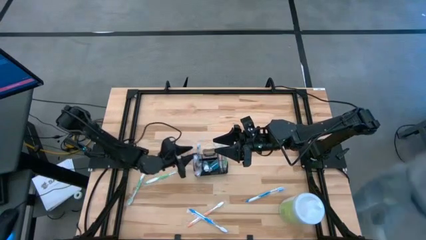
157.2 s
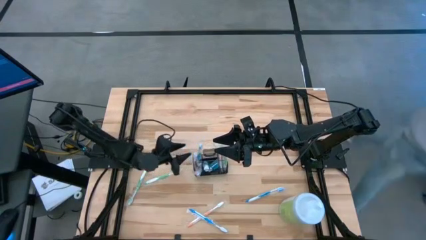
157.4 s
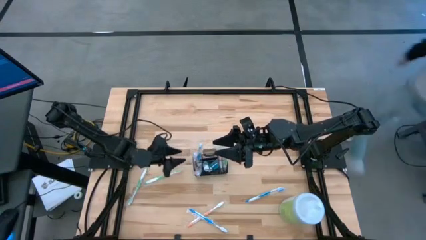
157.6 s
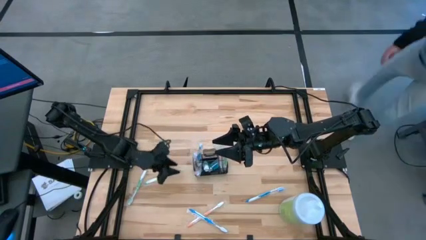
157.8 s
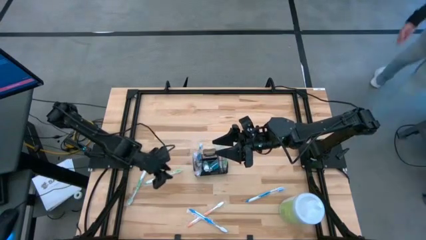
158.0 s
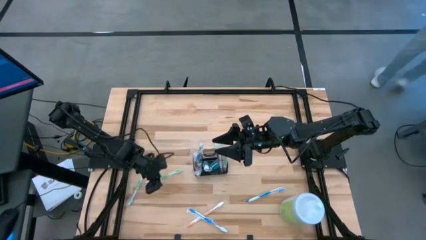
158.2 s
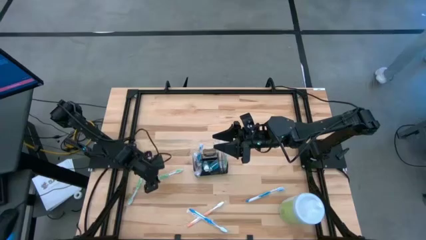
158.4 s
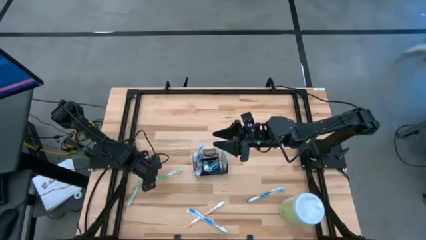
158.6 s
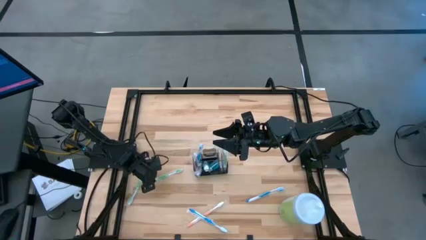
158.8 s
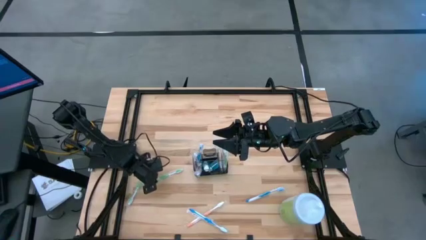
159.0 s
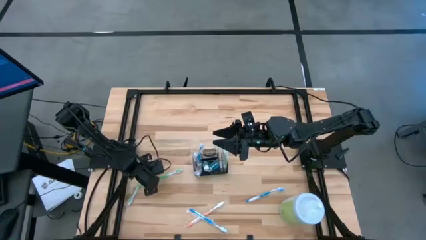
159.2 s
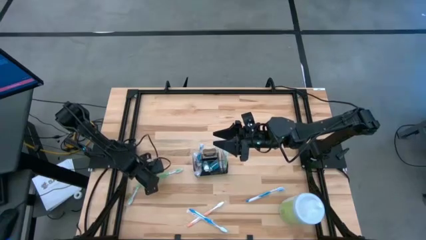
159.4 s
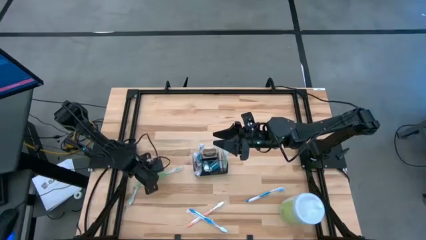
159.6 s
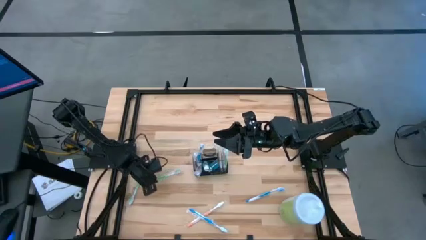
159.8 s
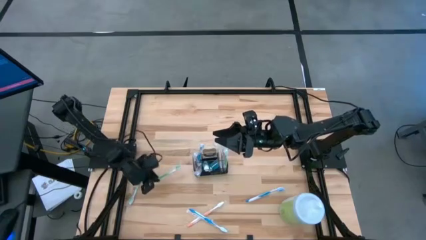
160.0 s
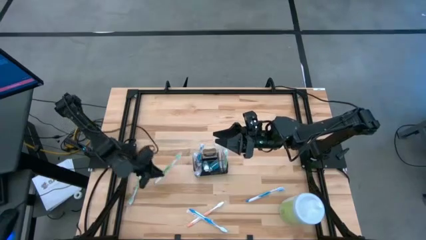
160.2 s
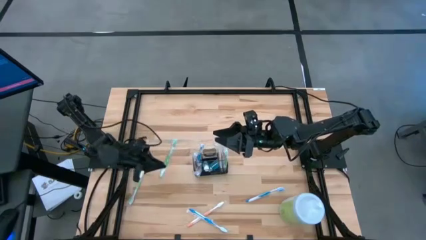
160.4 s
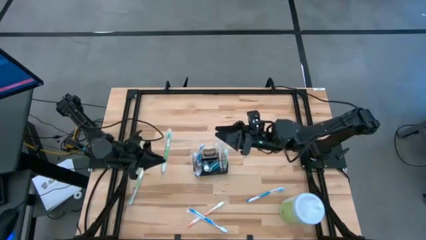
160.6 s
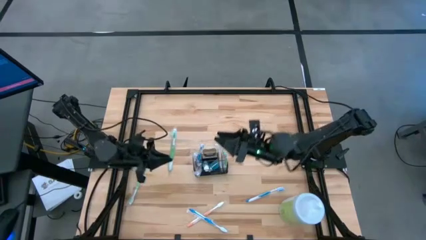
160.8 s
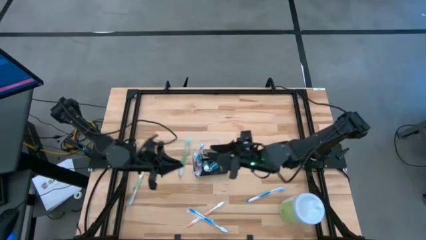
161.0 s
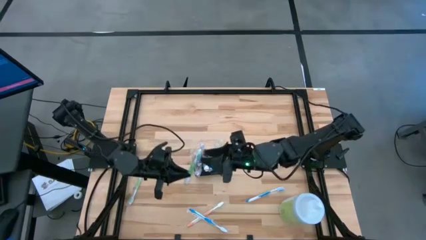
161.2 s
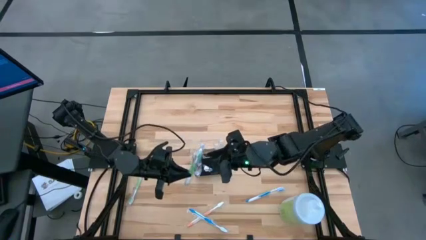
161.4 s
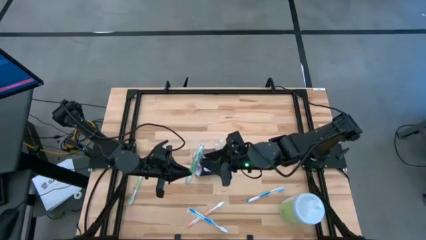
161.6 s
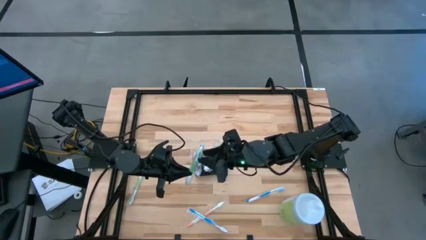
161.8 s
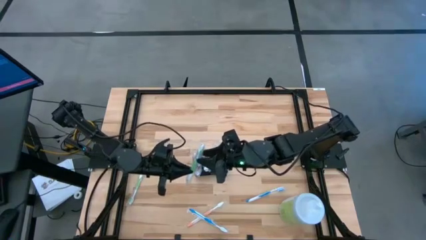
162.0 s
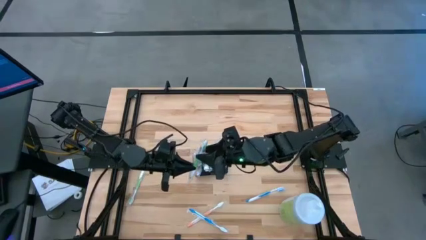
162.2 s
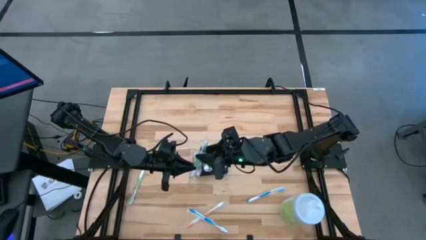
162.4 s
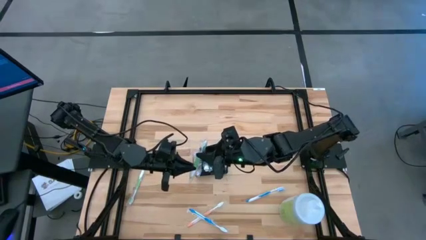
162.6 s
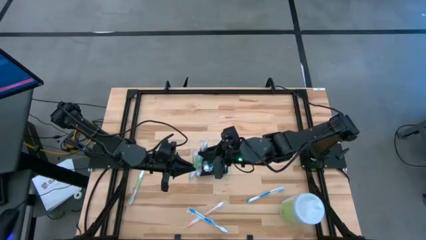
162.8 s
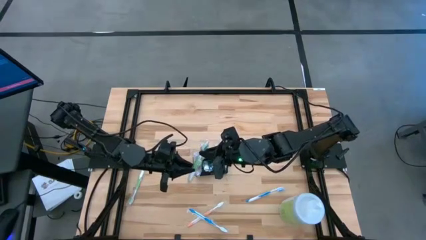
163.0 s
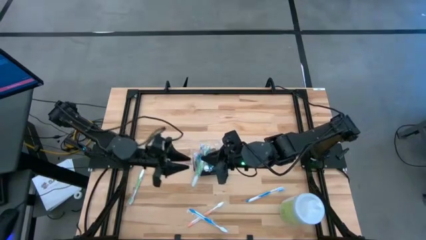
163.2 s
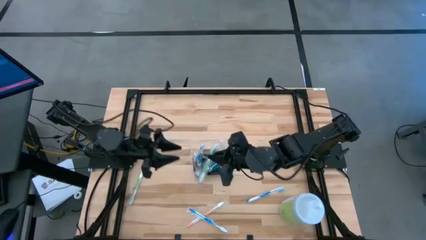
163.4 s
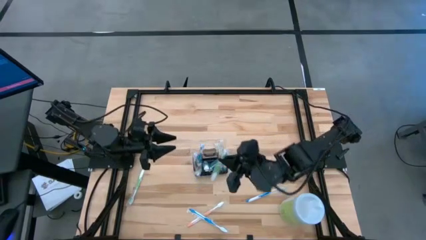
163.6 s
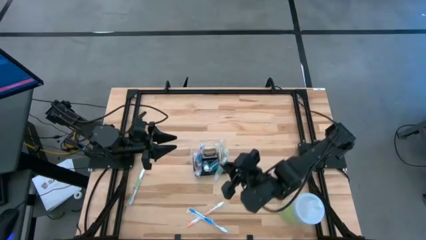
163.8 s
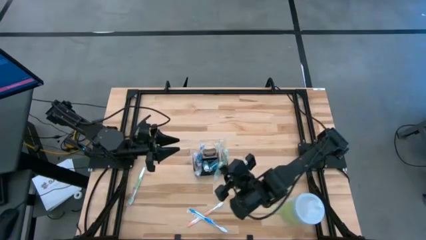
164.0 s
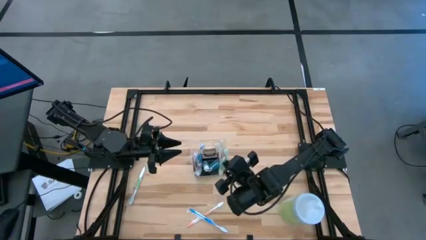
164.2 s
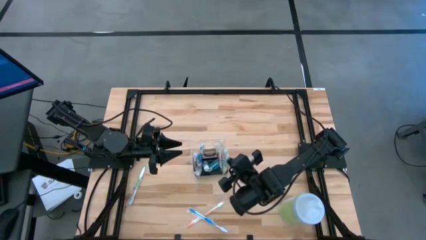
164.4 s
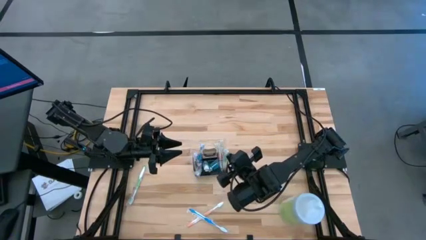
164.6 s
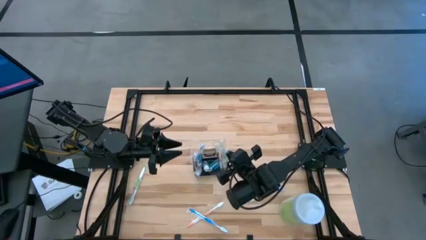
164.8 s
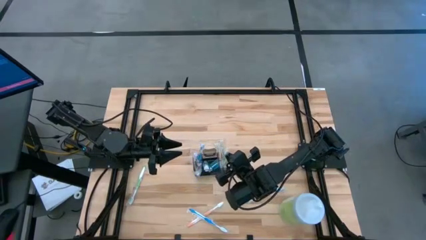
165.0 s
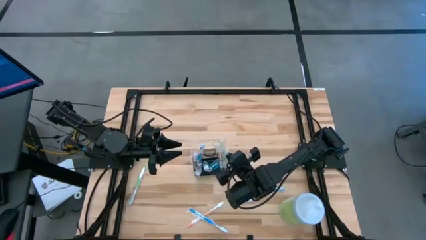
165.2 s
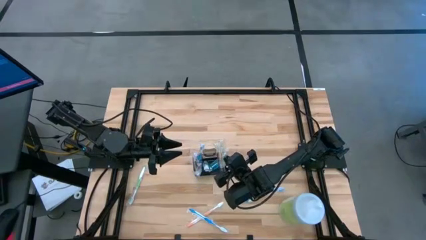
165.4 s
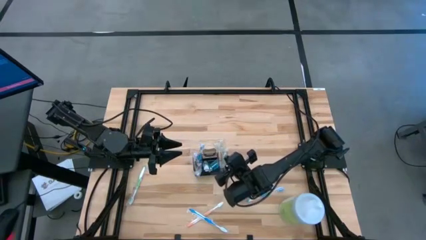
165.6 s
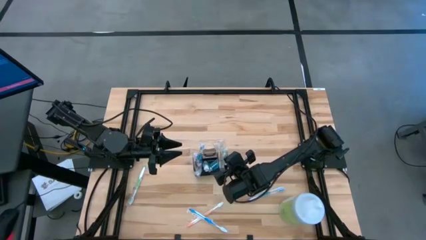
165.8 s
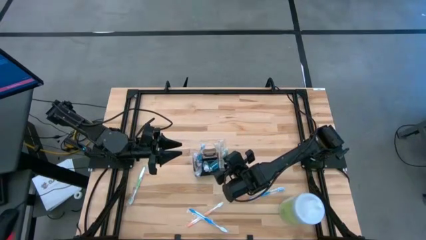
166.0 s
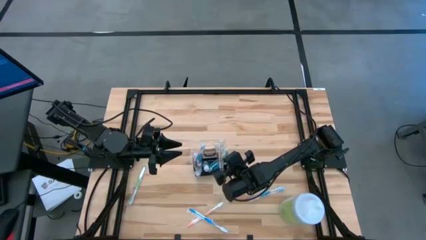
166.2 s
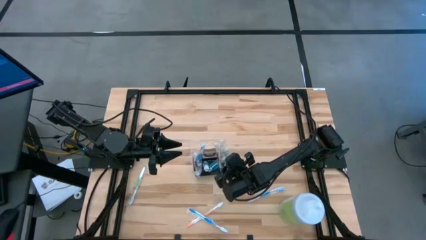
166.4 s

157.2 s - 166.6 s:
Task: Pick & Place toothbrushing station
Put the right green toothbrush into the bottom right section of the mesh organizer

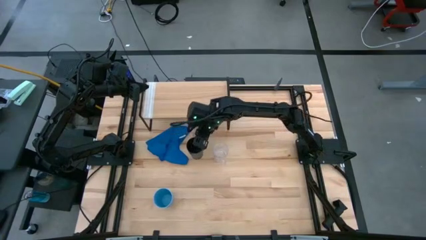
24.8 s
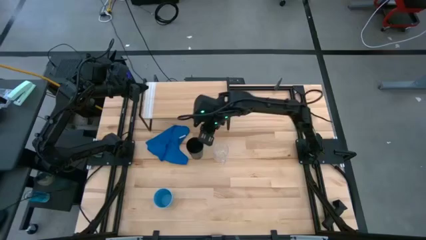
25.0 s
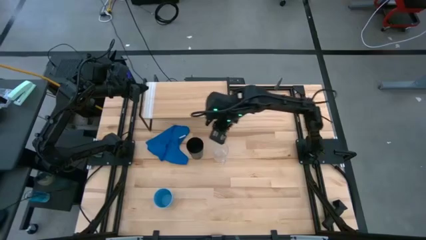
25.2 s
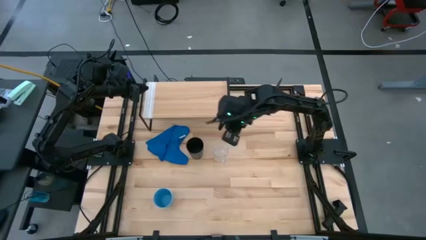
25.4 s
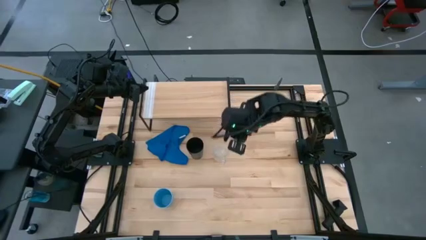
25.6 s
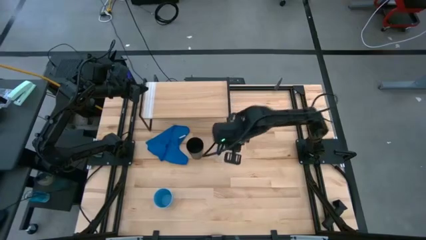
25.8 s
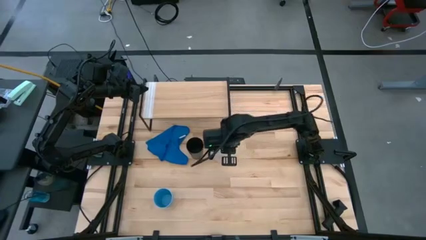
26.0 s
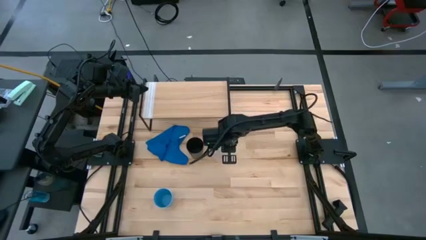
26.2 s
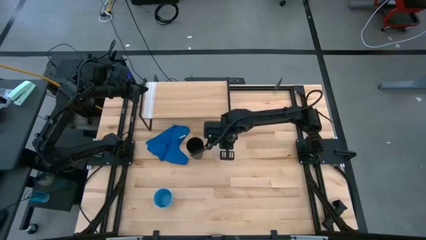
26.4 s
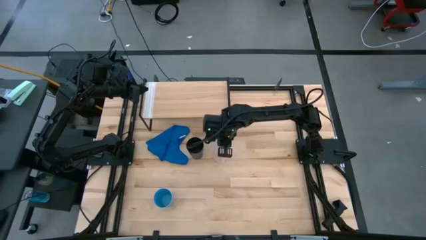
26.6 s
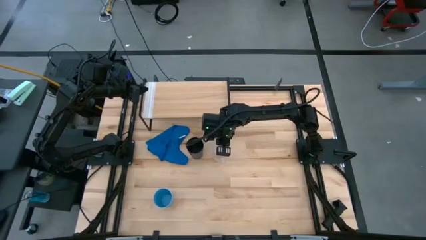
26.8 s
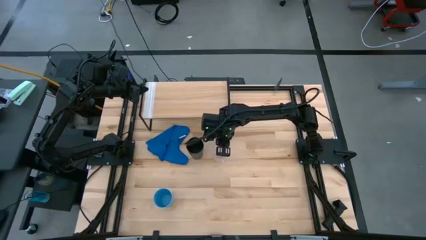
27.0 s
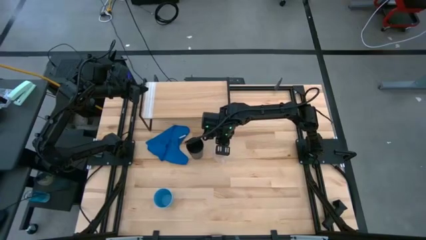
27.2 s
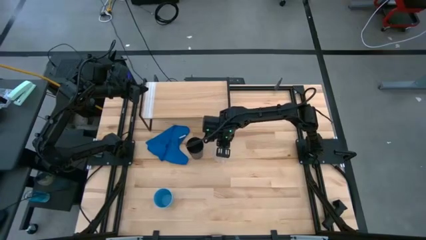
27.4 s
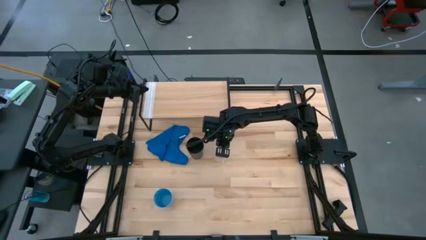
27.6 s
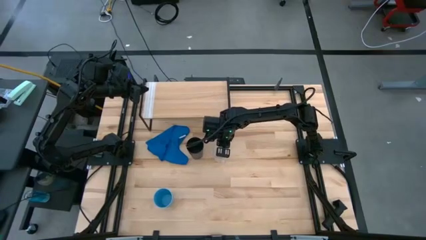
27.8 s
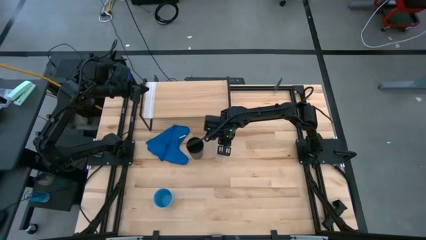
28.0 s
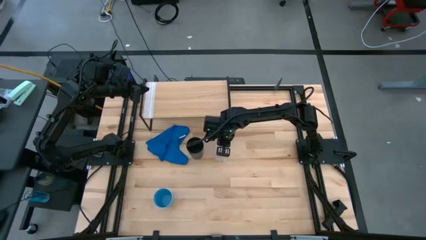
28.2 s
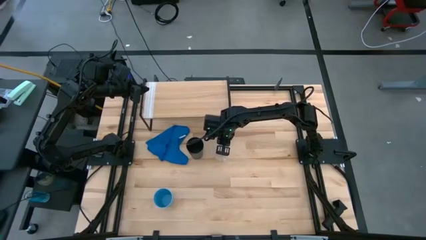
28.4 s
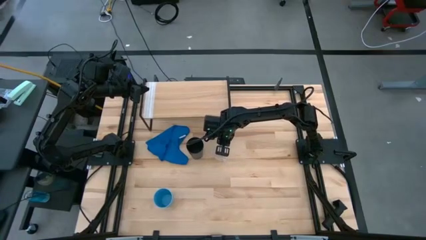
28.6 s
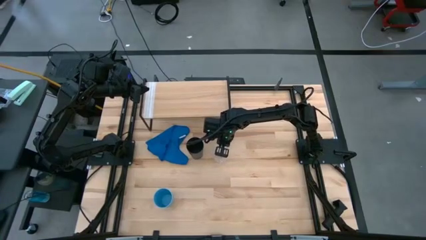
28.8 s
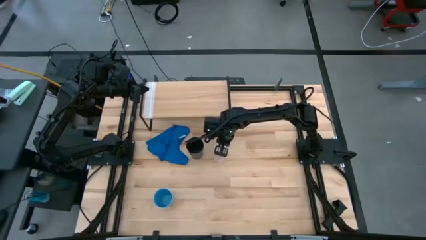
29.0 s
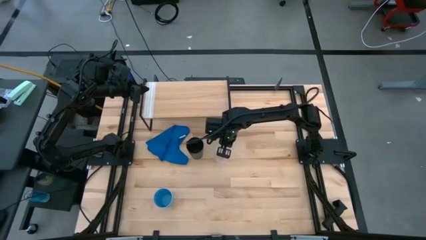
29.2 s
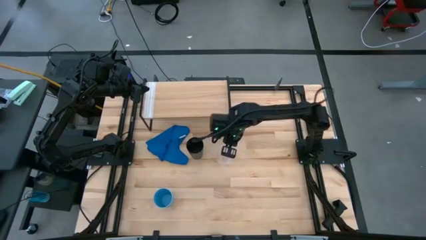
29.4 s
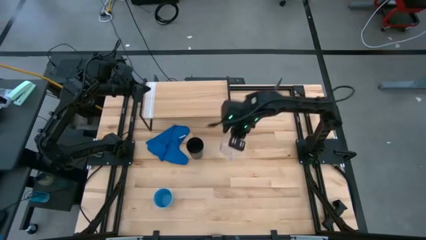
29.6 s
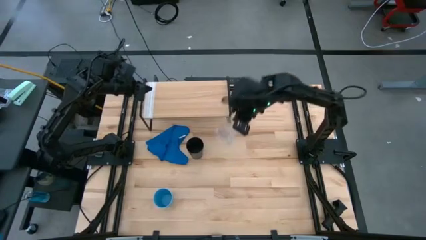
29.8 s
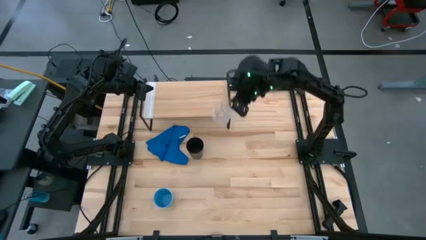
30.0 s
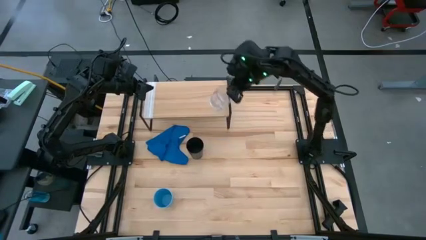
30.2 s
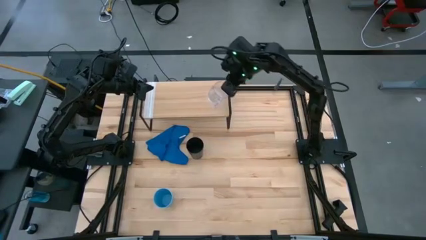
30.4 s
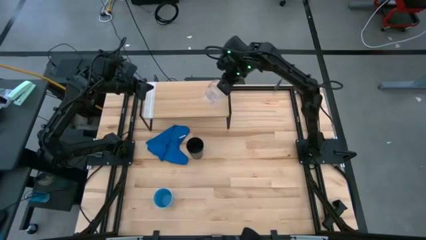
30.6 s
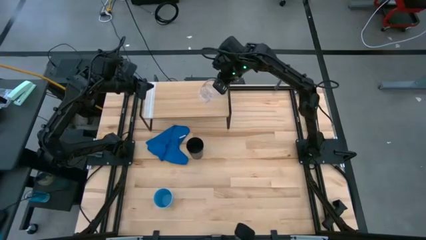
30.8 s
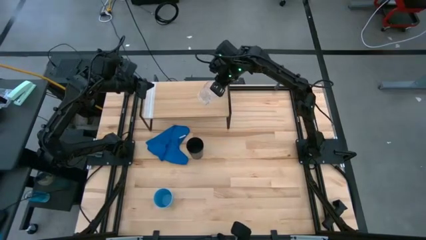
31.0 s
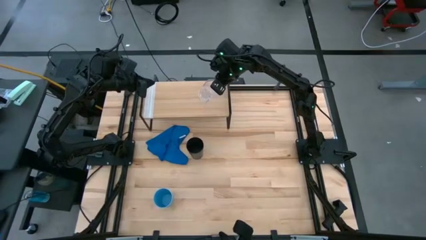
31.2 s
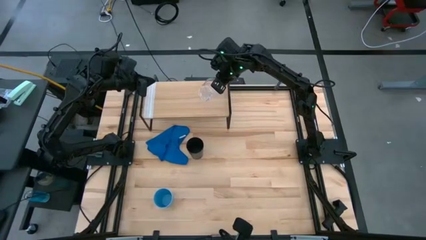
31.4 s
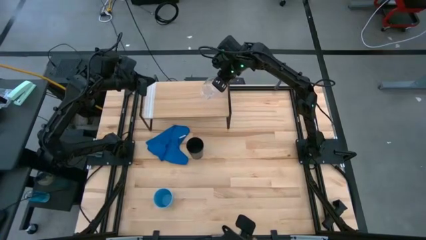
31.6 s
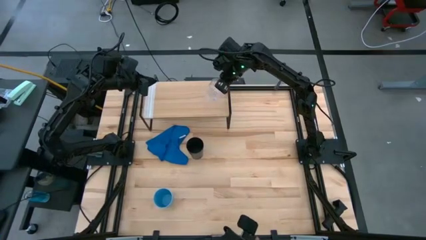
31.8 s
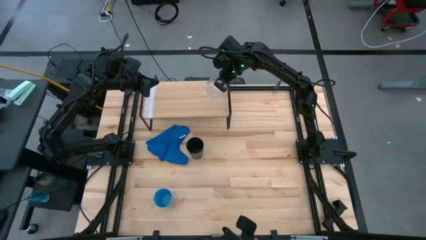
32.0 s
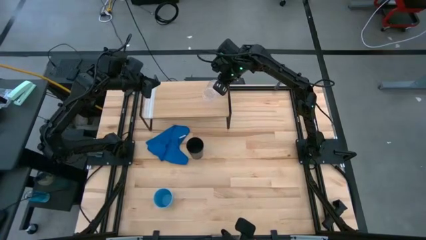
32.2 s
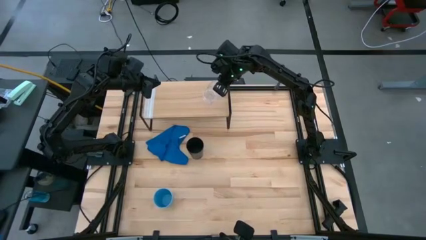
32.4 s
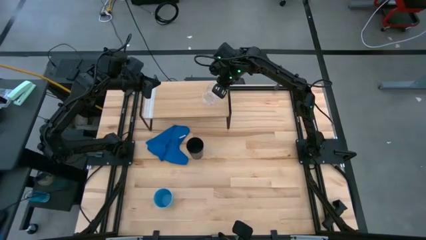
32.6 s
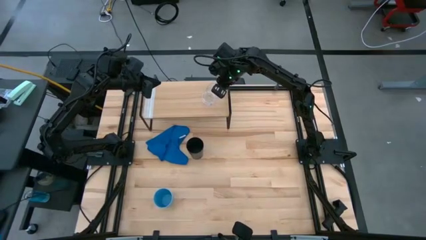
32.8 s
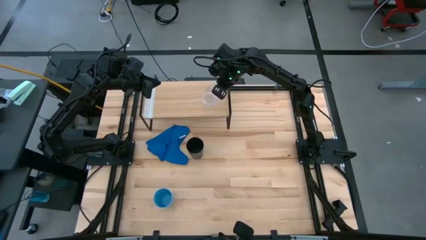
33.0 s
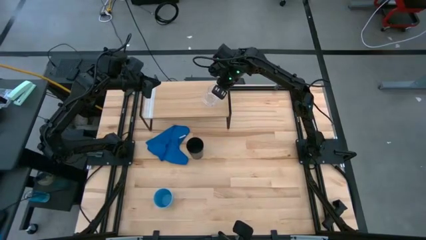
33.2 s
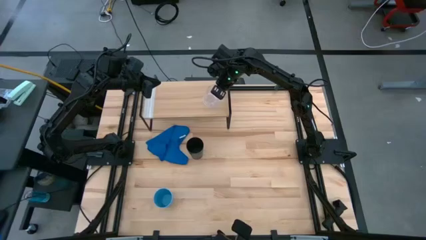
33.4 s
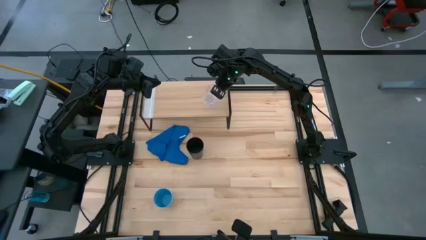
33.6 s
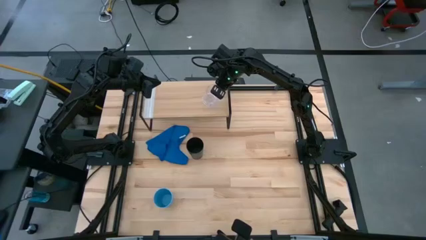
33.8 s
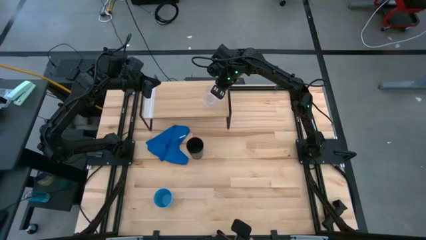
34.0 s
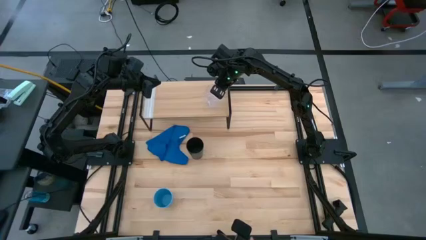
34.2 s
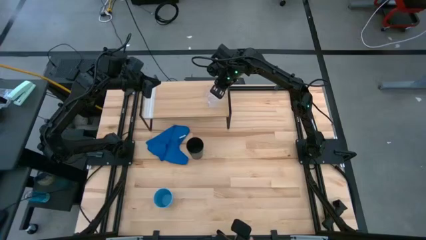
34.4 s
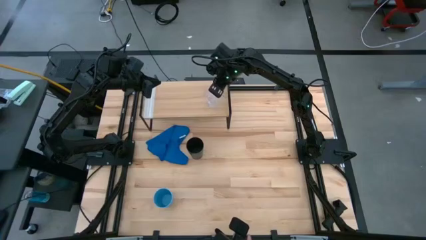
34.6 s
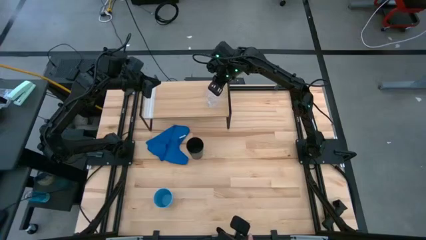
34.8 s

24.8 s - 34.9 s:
Task: Stack small to large cups/mugs on shelf
Put the transparent mug on the shelf
